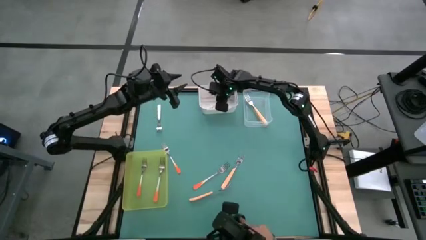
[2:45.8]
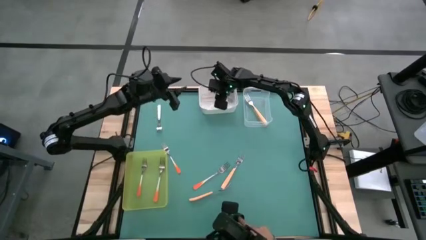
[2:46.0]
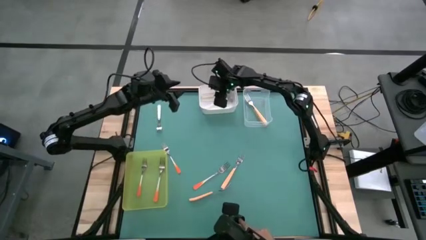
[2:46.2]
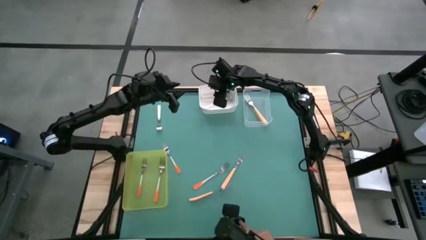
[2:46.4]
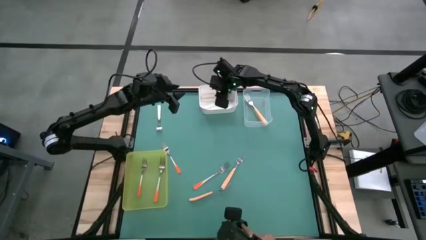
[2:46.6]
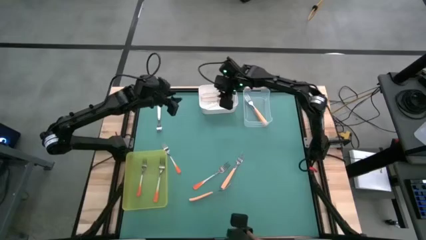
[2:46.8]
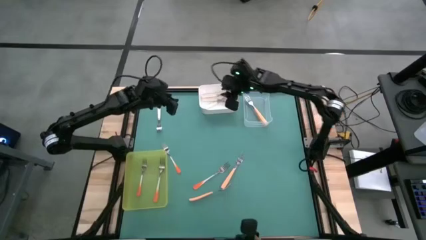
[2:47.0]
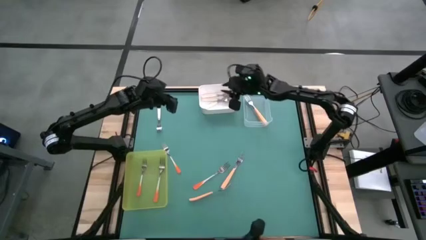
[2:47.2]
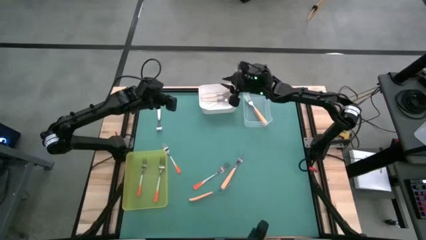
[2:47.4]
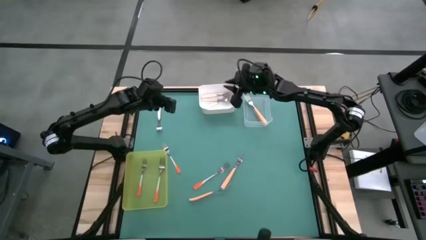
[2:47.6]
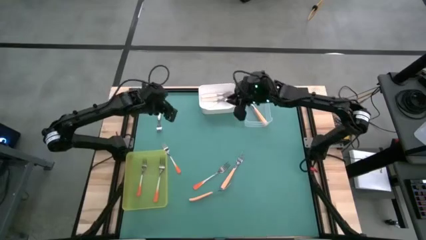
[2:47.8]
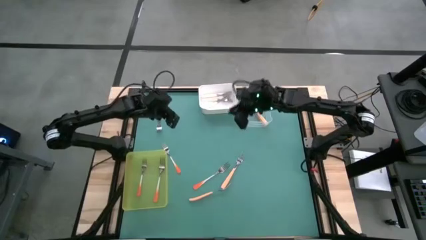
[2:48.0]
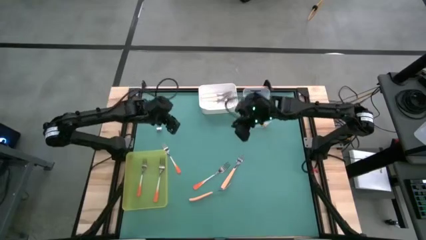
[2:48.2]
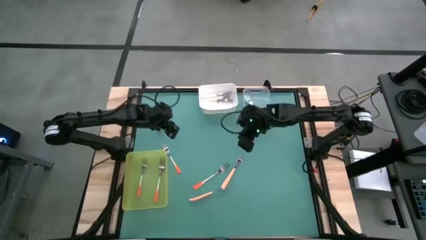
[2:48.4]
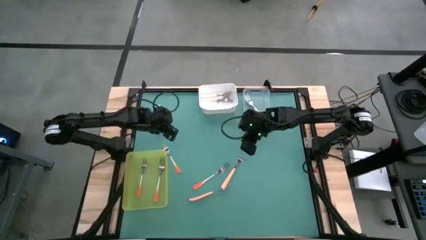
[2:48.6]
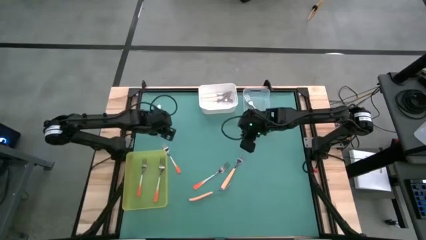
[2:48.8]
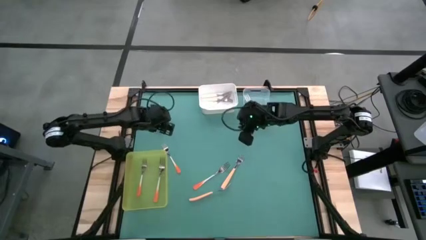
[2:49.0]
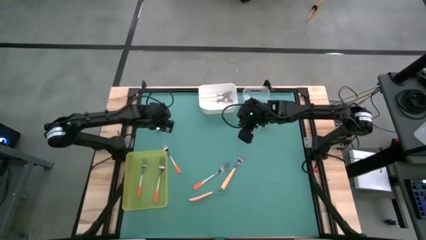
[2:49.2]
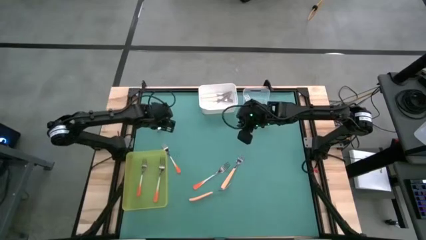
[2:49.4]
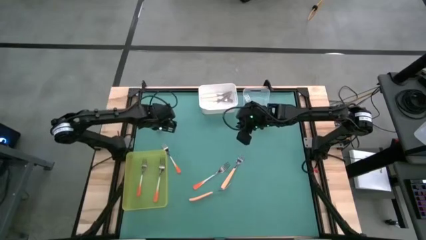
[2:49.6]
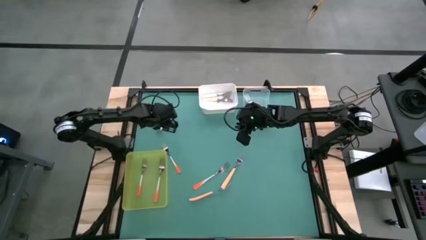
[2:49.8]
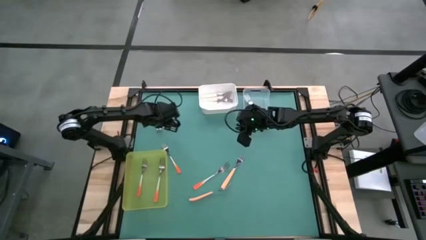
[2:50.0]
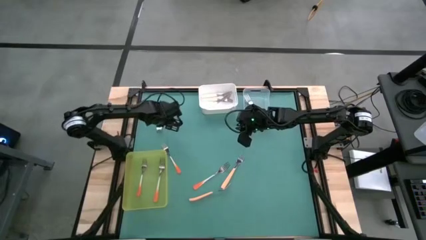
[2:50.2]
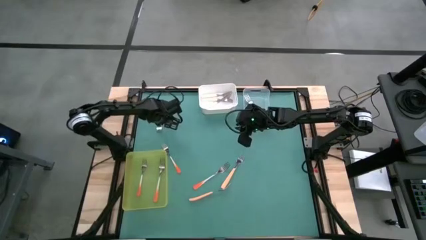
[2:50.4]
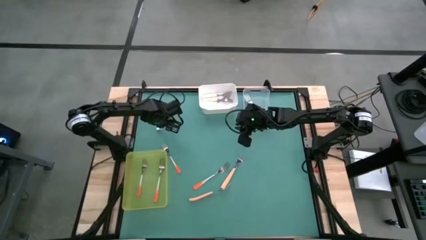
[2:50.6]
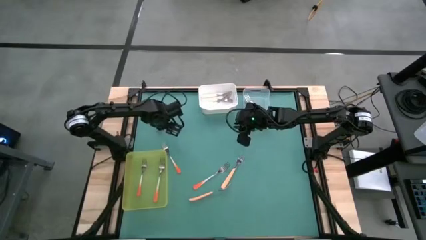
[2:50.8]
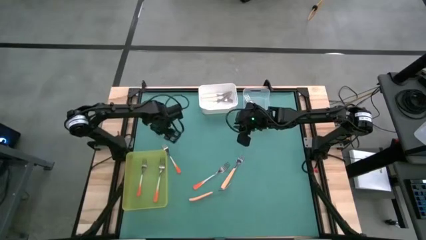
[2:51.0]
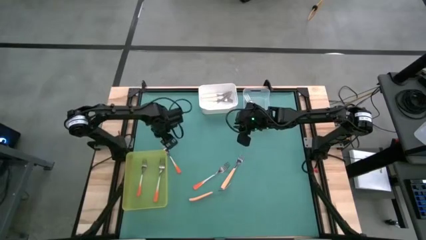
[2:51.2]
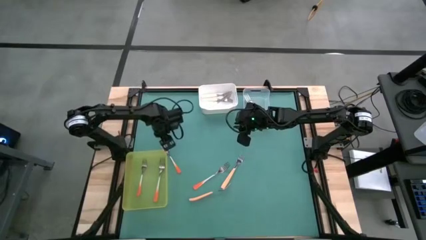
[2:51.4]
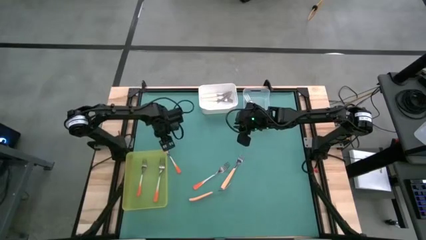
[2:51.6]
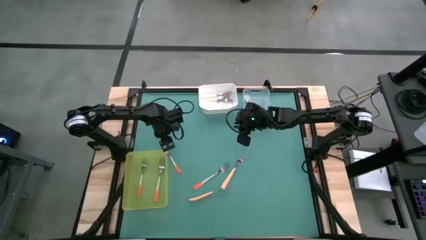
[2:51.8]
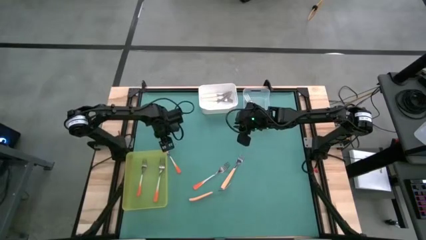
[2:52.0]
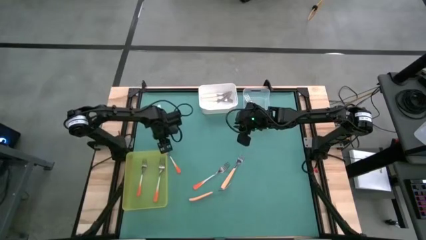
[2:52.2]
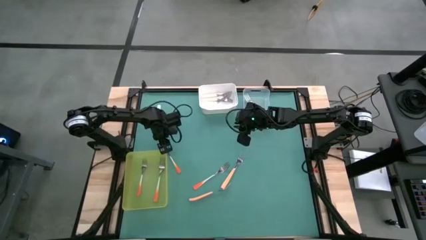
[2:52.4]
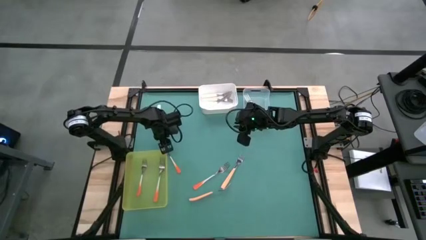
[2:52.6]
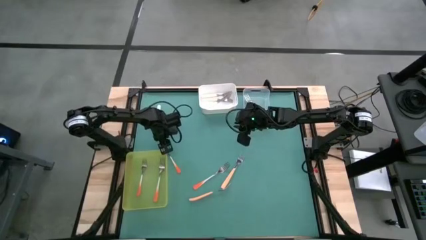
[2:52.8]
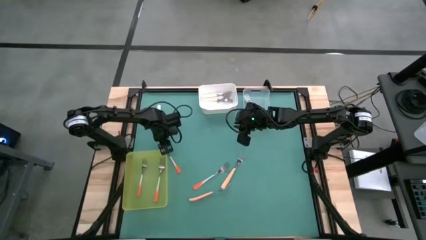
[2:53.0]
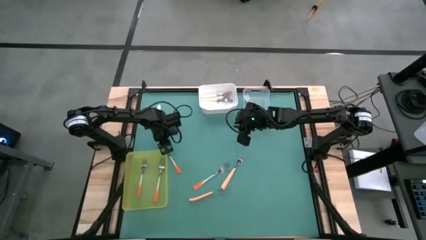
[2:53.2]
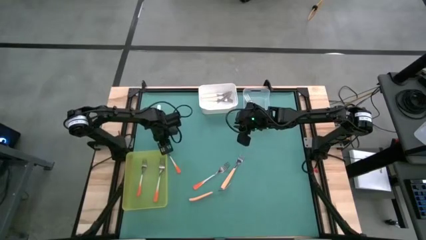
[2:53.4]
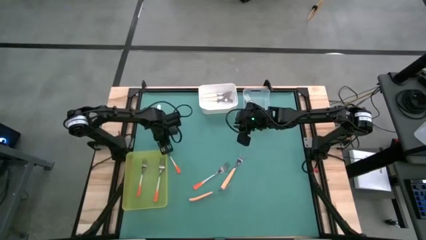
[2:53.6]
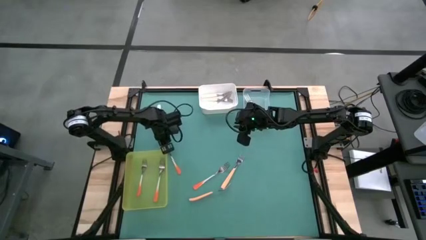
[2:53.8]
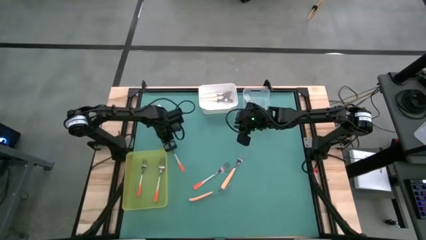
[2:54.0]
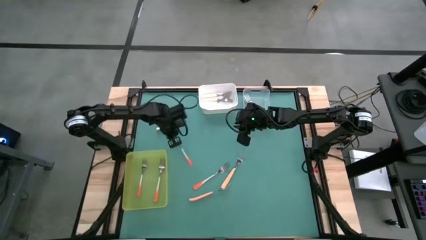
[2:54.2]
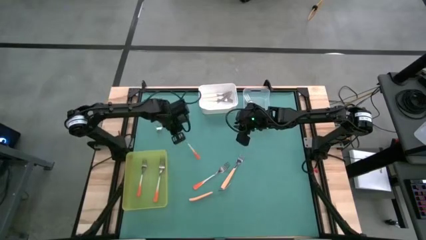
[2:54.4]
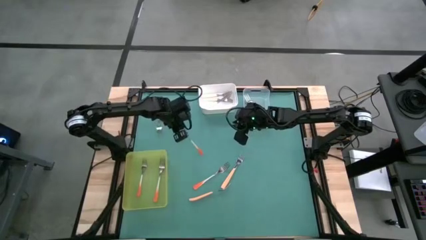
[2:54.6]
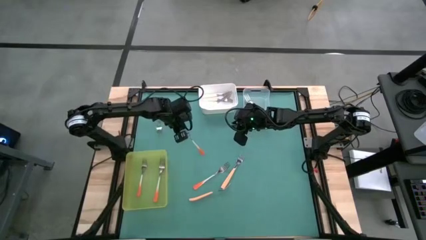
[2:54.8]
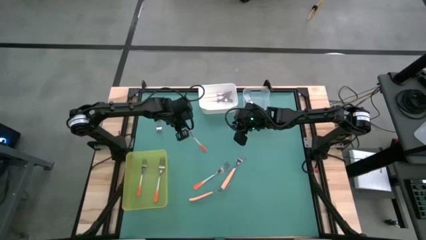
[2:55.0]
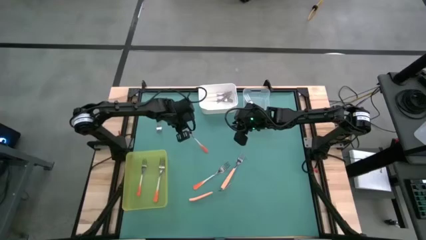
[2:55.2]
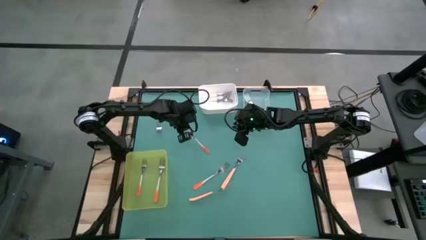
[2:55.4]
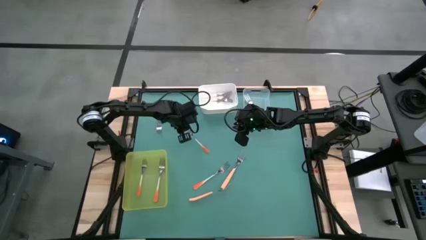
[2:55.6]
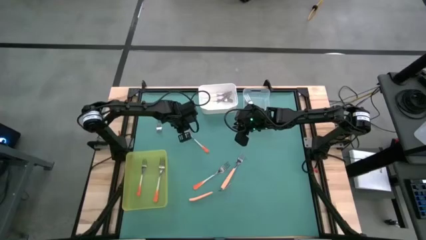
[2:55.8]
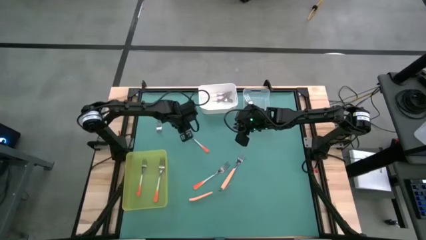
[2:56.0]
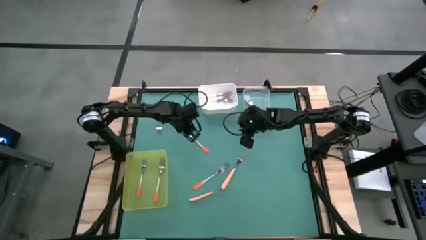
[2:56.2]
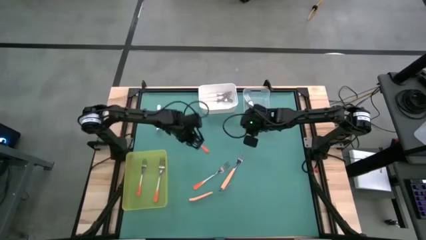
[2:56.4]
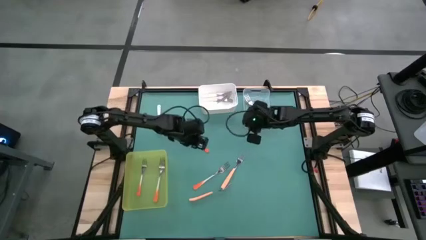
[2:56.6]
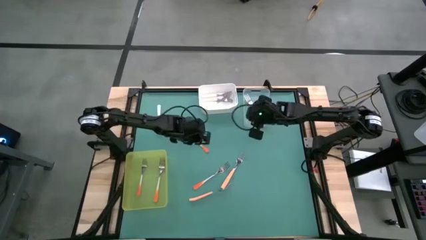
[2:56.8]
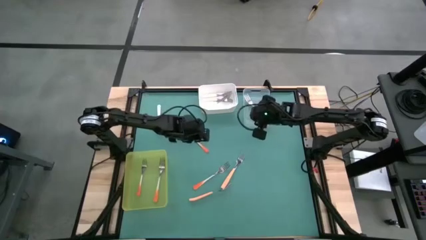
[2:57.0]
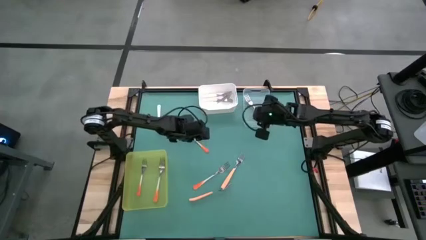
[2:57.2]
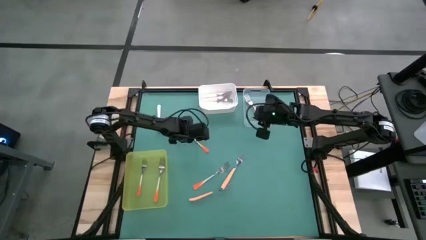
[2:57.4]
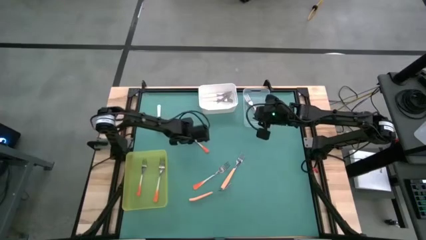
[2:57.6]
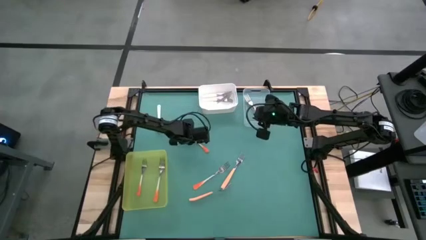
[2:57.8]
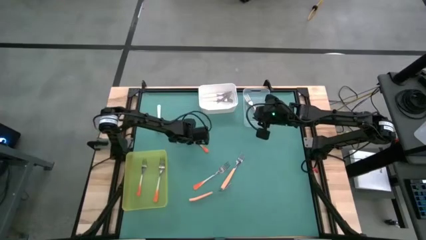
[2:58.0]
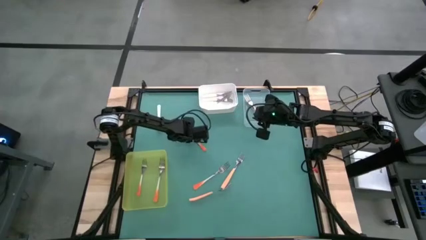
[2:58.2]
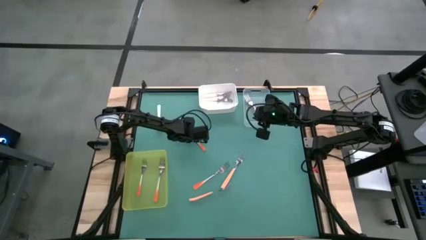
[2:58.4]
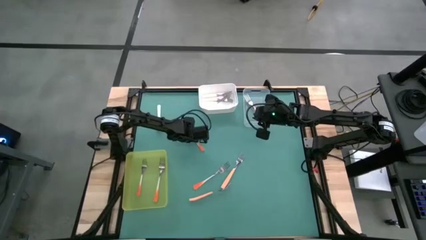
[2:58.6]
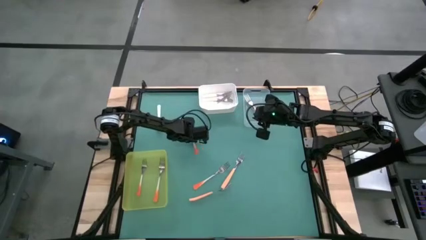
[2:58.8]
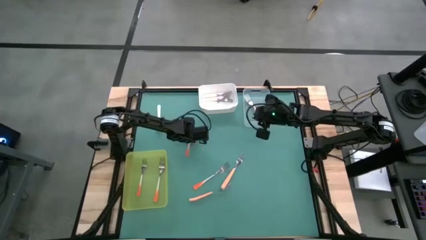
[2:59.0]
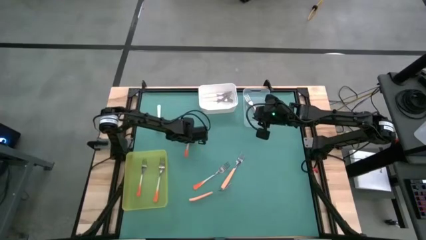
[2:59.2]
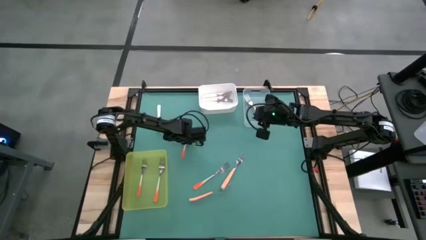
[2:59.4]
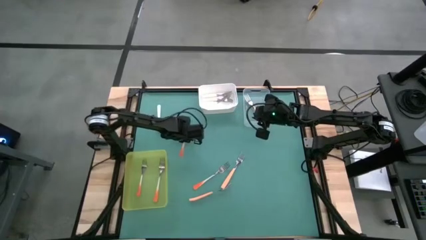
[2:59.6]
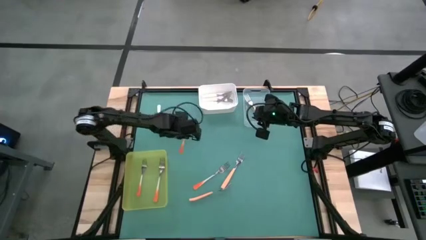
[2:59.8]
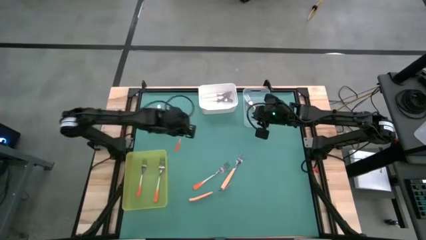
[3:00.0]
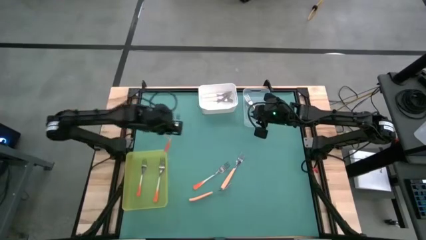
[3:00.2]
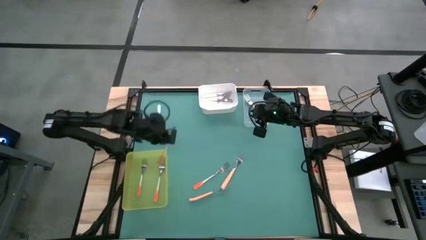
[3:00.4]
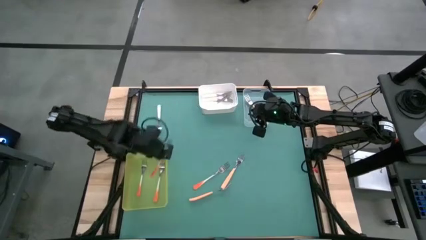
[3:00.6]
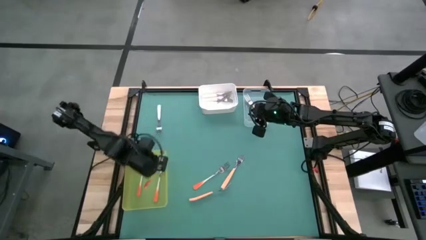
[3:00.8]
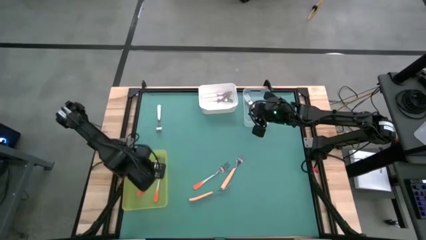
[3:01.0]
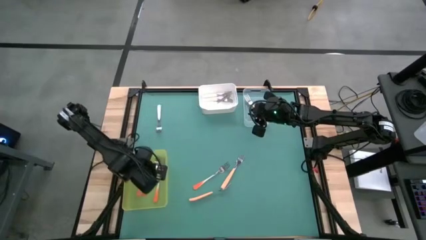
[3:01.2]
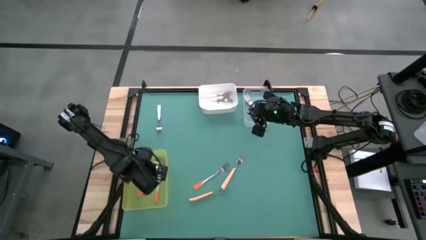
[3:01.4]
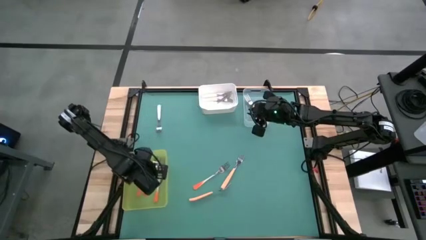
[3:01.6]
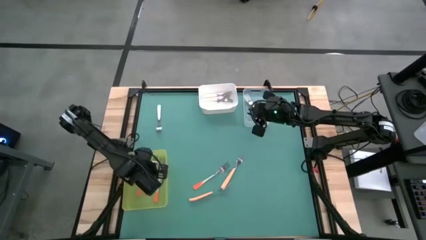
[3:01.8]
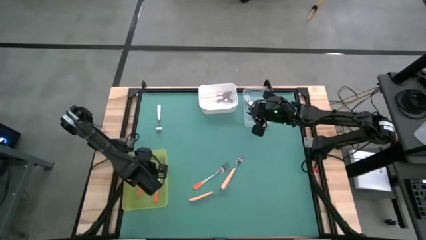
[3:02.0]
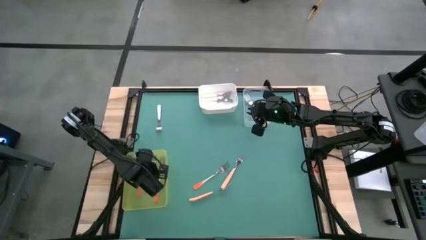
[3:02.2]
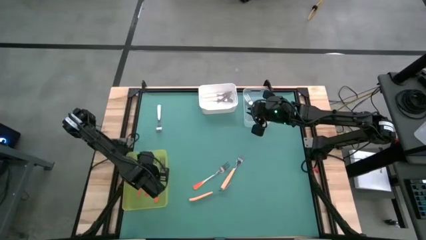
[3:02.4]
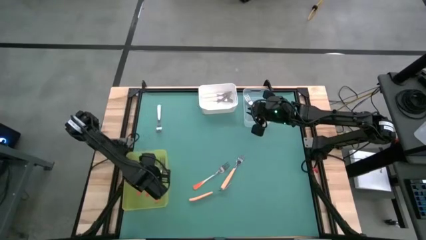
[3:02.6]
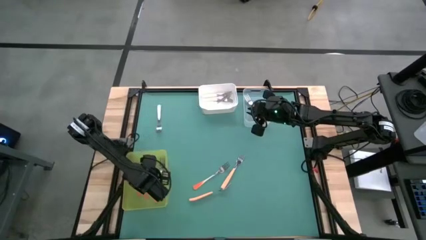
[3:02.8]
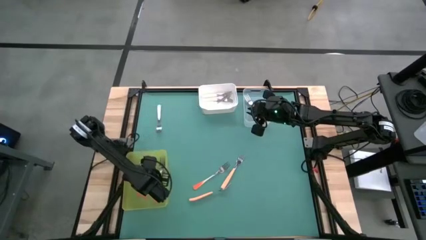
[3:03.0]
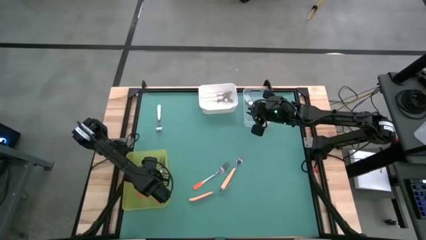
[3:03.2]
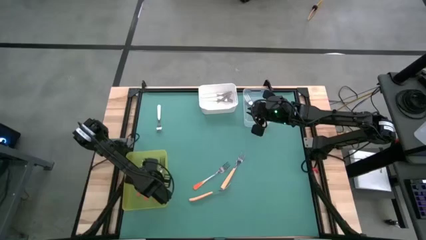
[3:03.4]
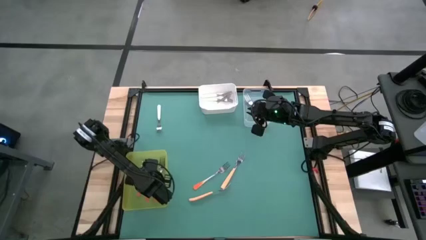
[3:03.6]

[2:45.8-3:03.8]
Task: Sort silverware by color (type)
Put the orange fork into the yellow bin
